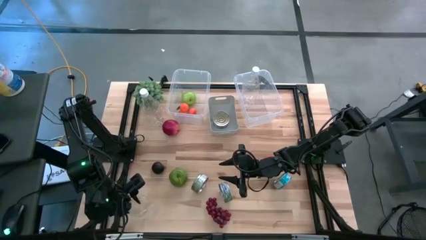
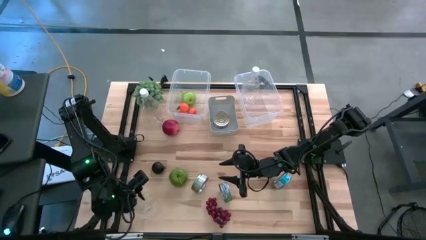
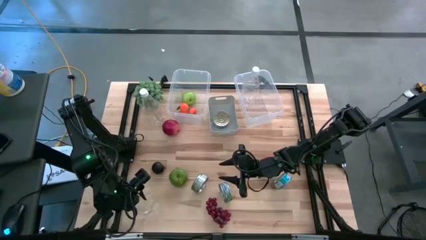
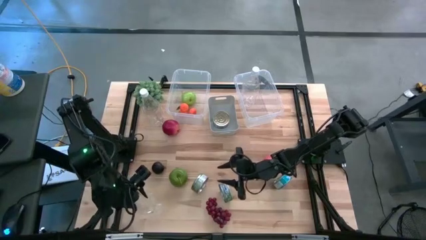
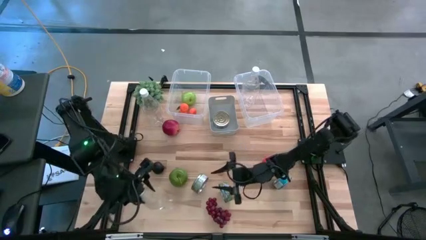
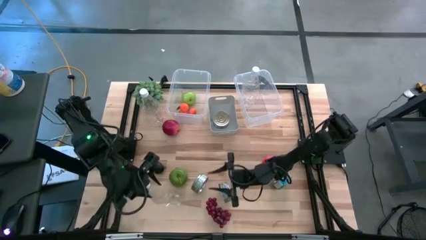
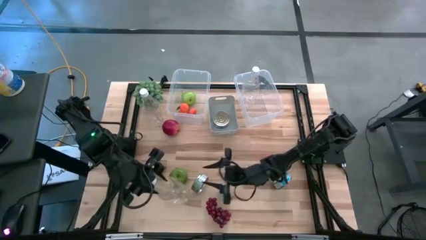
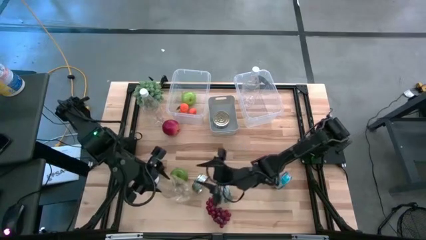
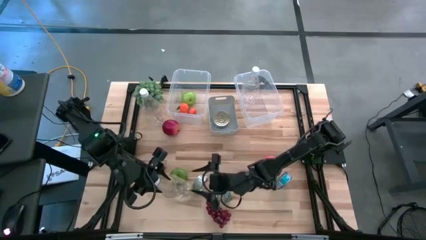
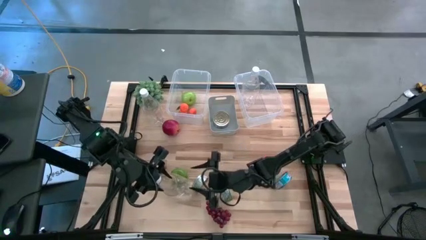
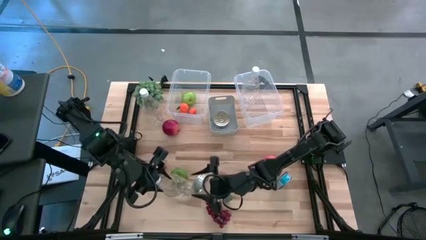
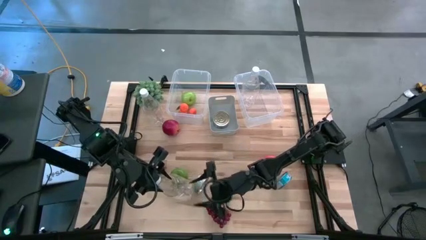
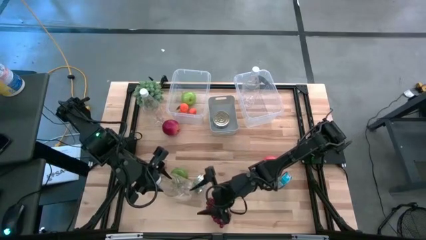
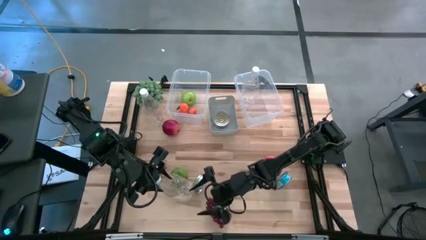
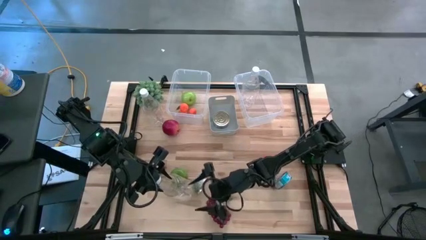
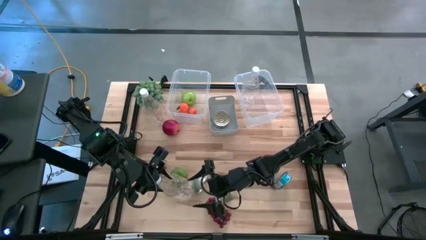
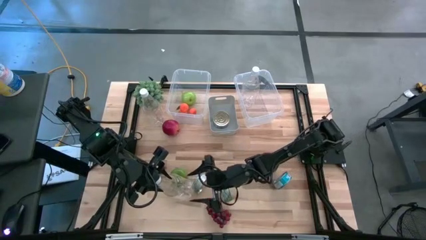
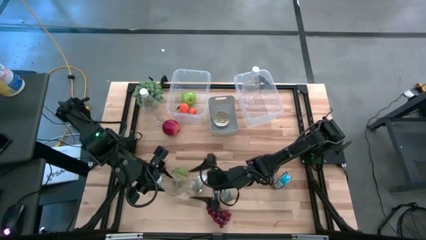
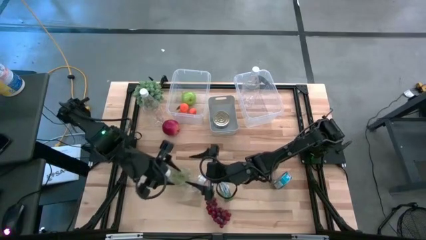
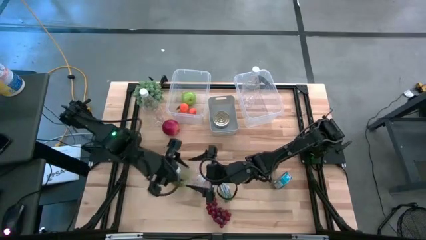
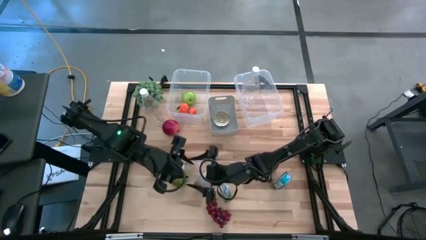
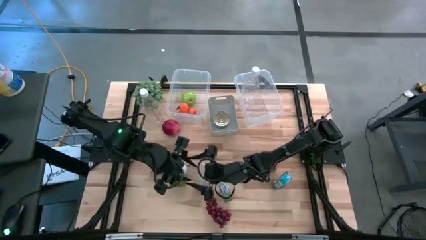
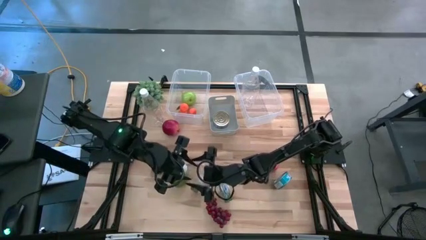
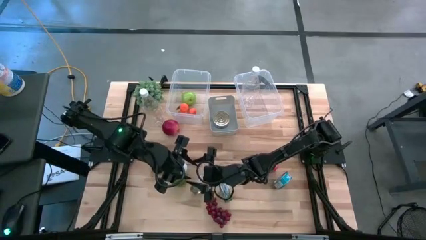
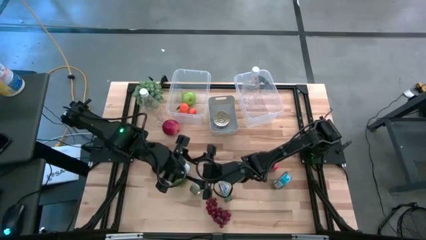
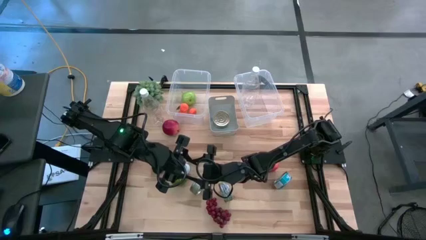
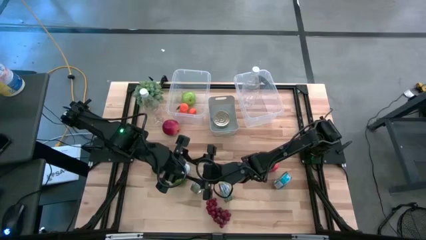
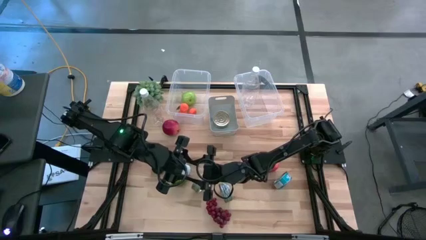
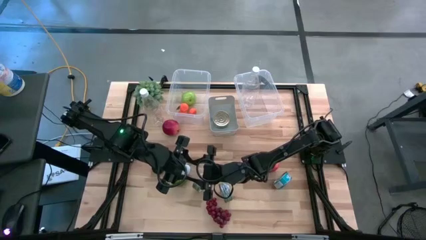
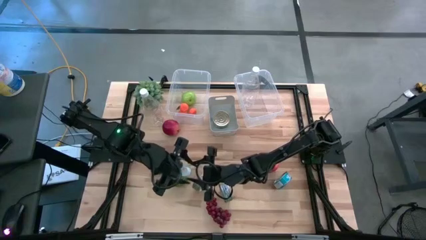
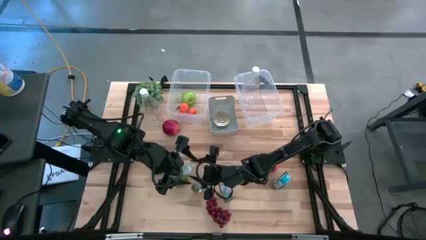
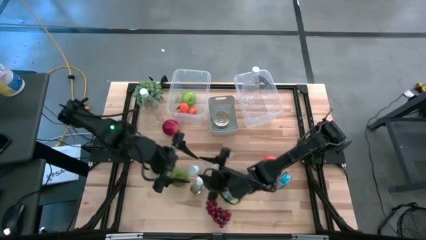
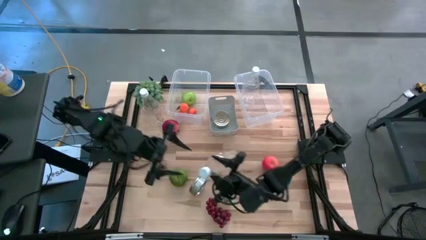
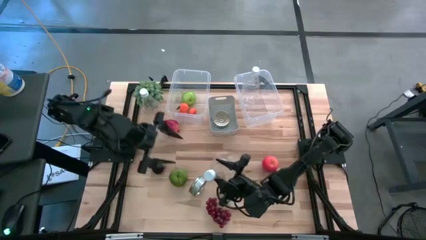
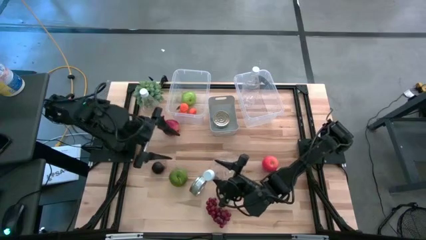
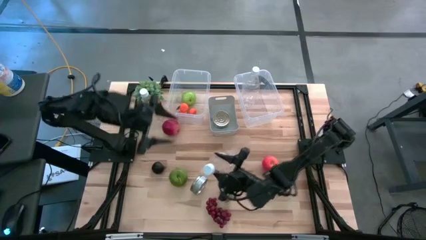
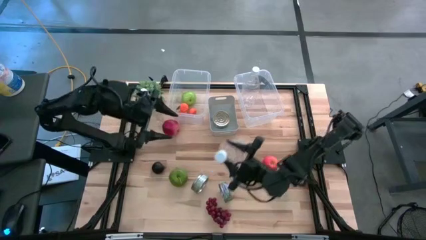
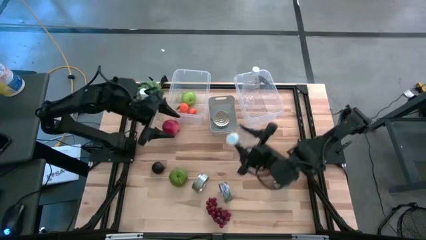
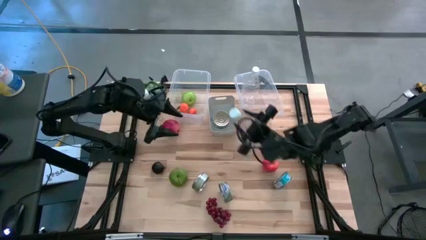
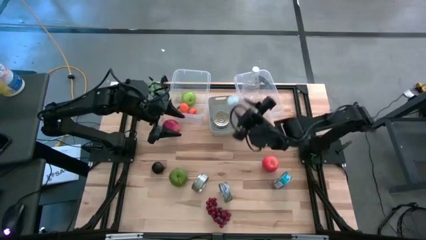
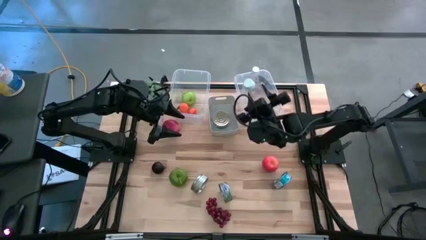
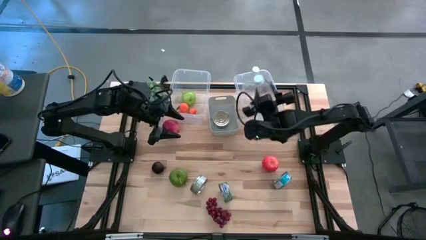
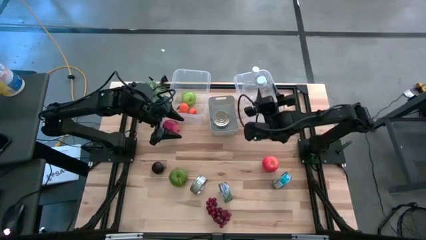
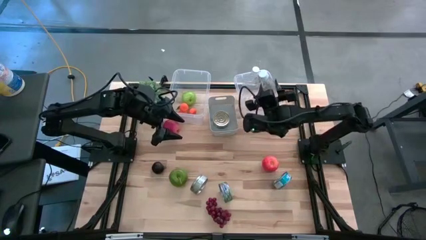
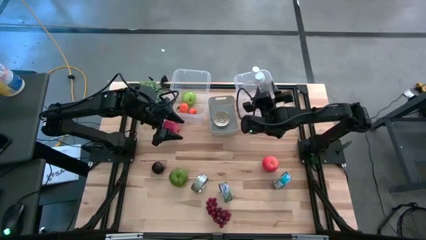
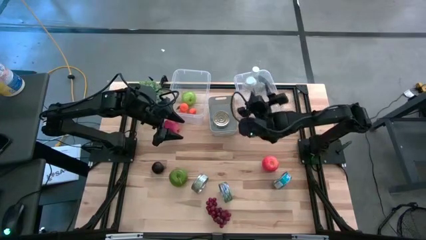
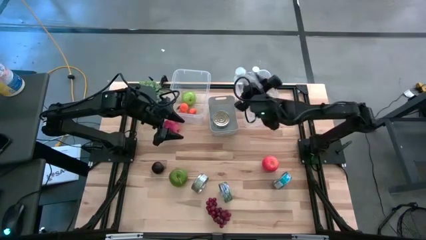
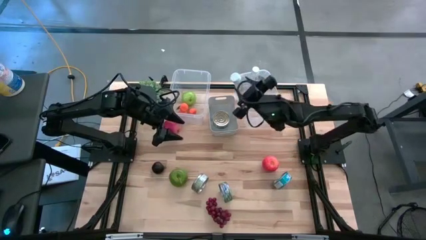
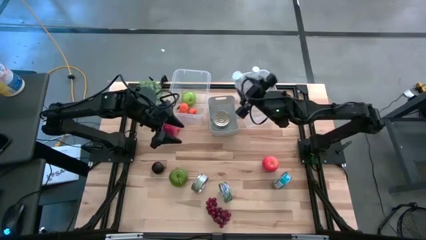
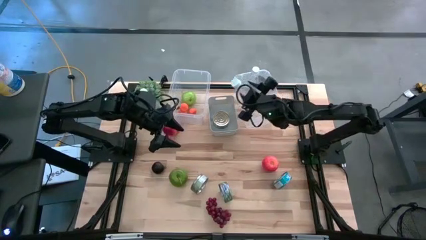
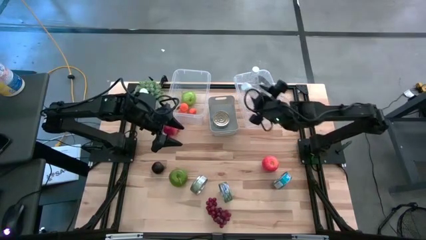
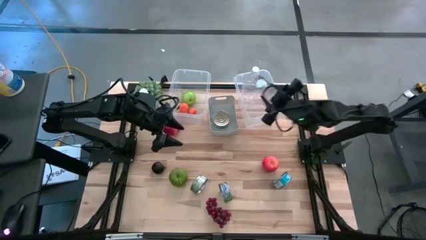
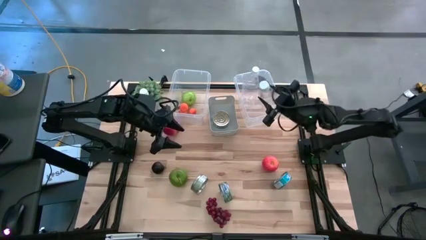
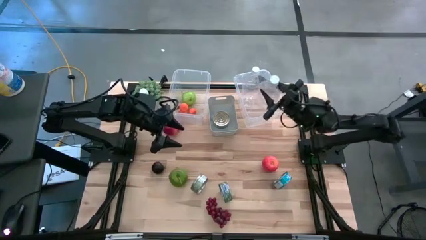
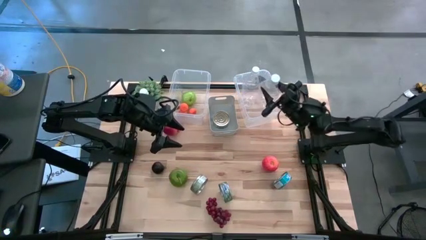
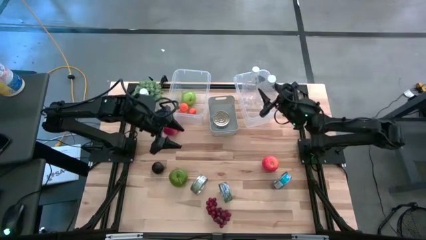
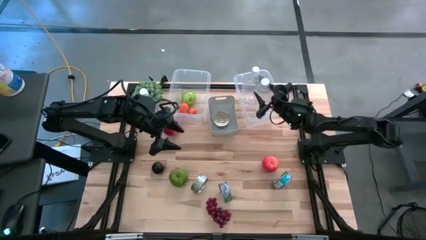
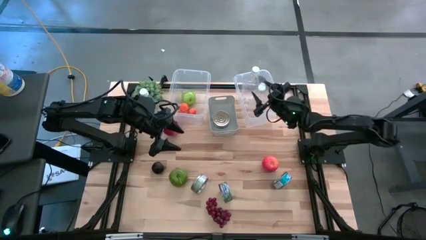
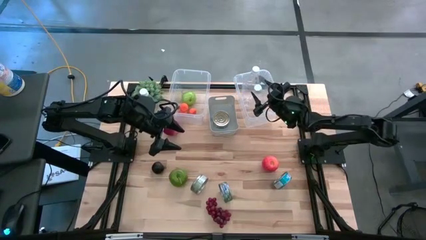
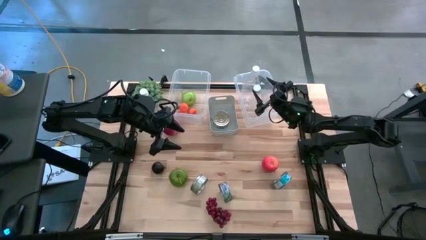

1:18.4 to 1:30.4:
Task: Pick & Place Food Item
Put the bottom plastic bottle into the right transparent bin

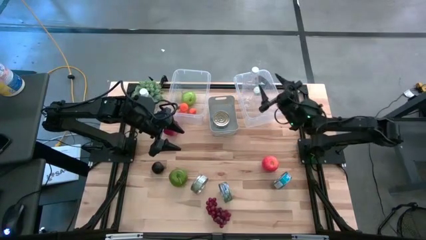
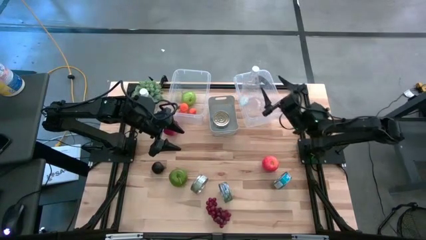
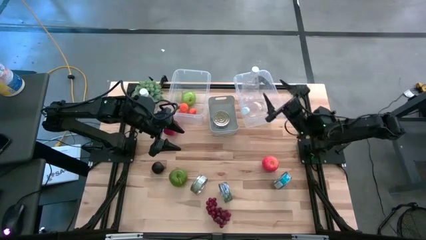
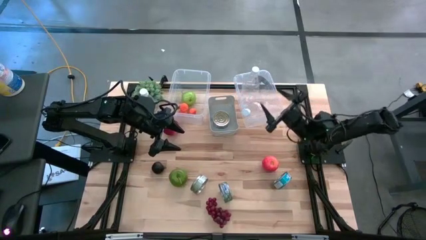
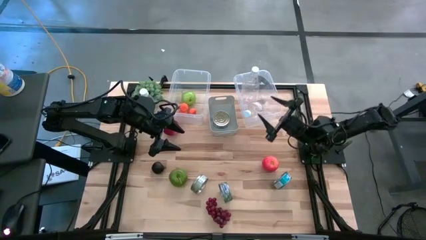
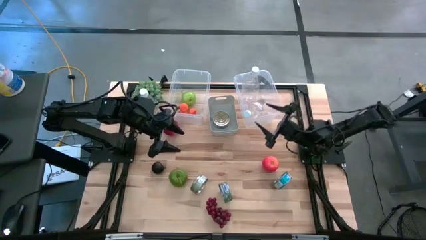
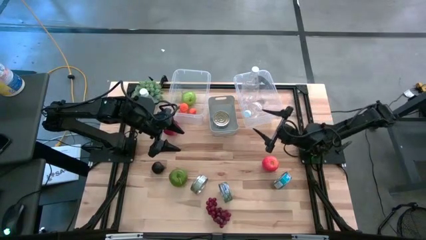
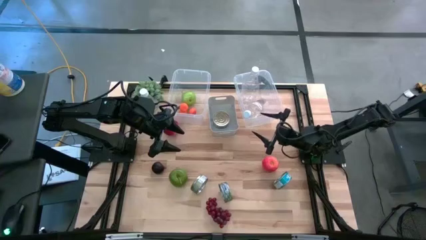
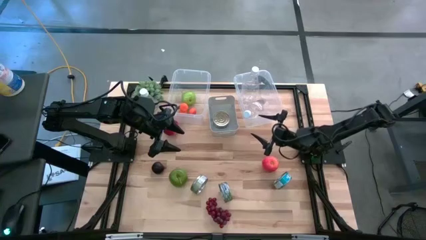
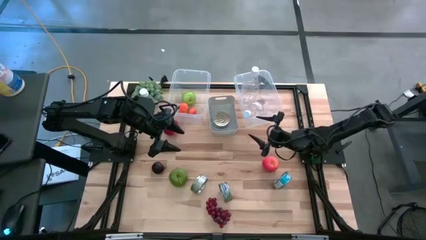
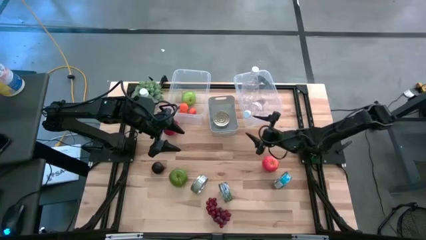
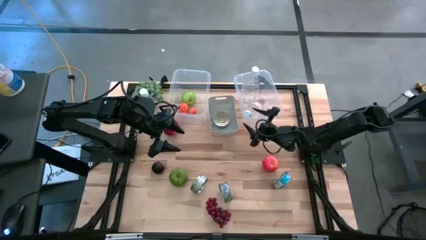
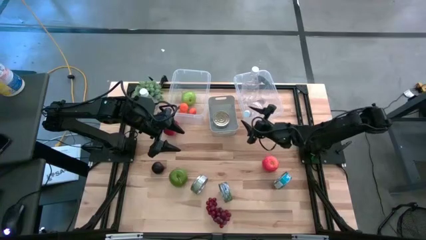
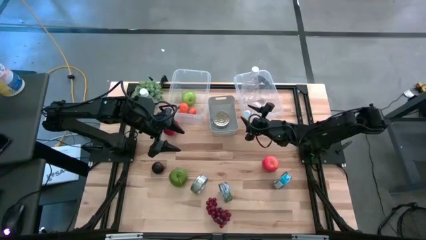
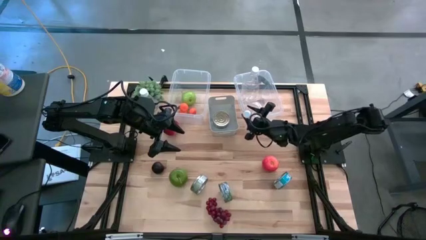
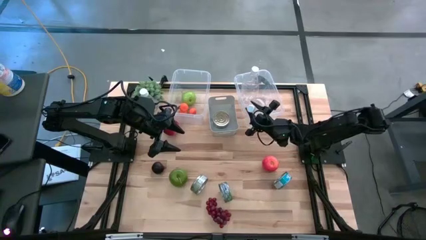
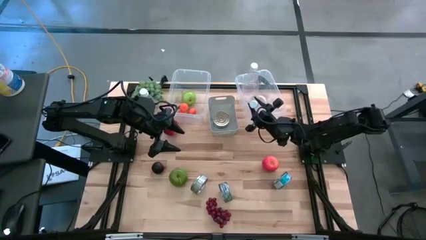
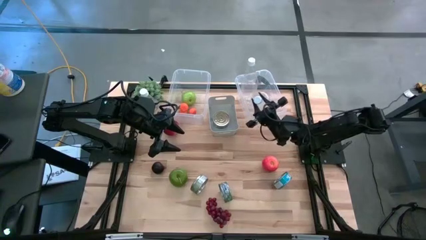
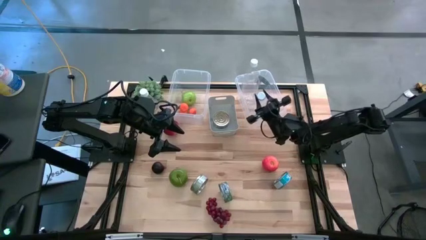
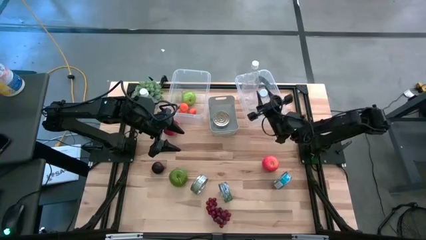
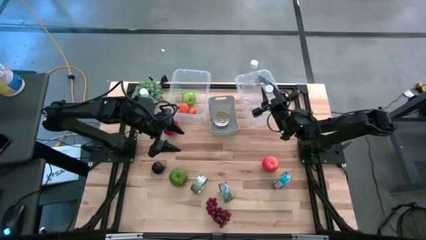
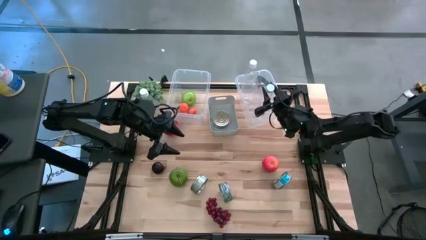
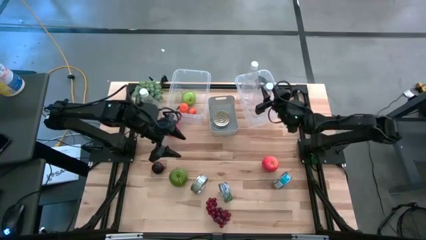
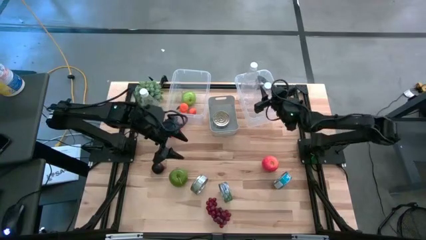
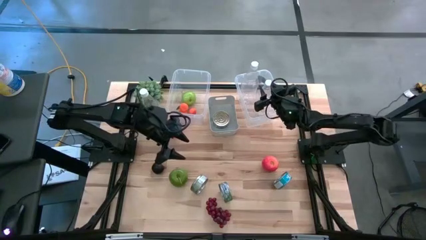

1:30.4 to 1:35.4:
Put the bottom plastic bottle into the right transparent bin
